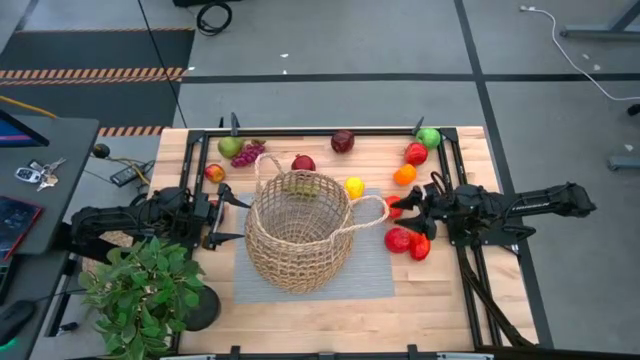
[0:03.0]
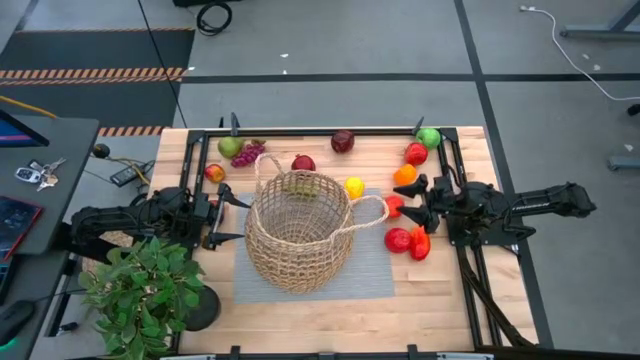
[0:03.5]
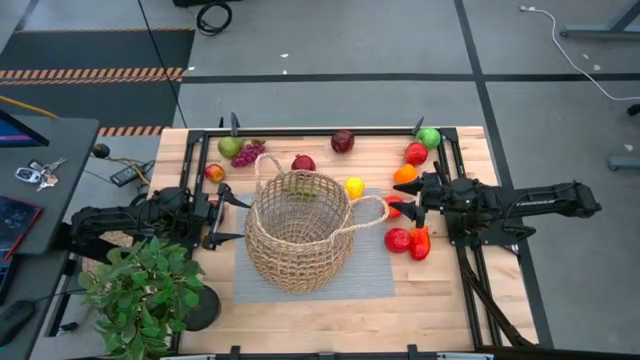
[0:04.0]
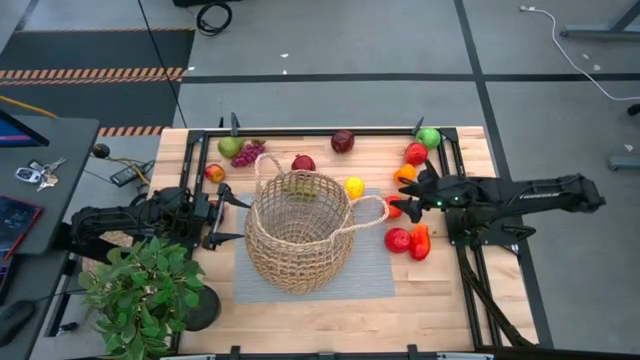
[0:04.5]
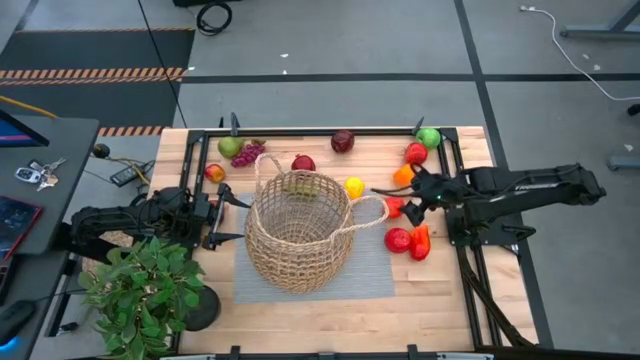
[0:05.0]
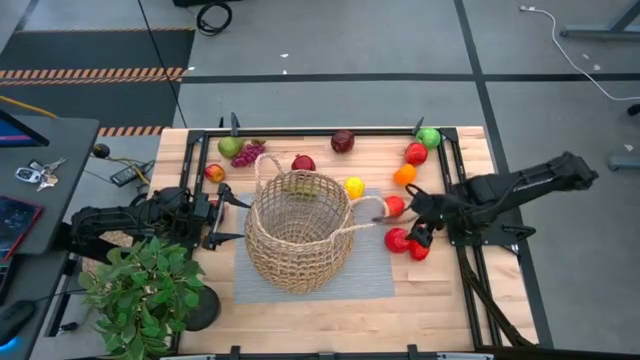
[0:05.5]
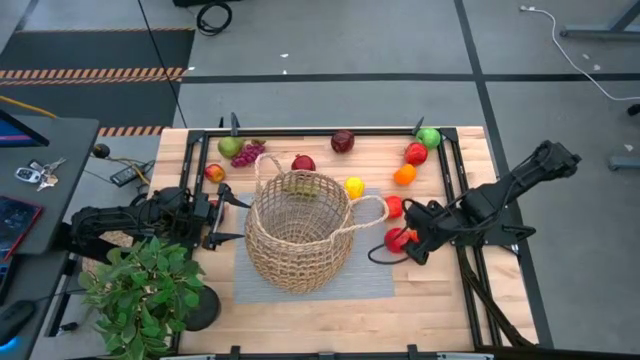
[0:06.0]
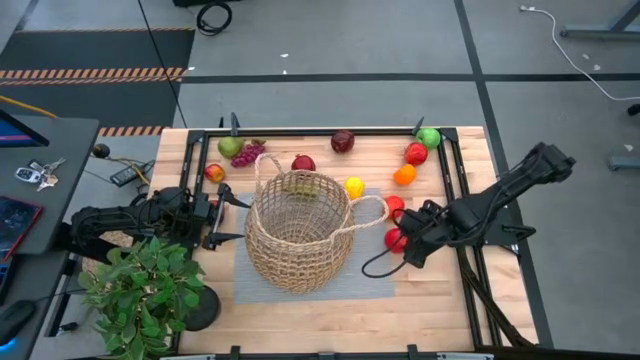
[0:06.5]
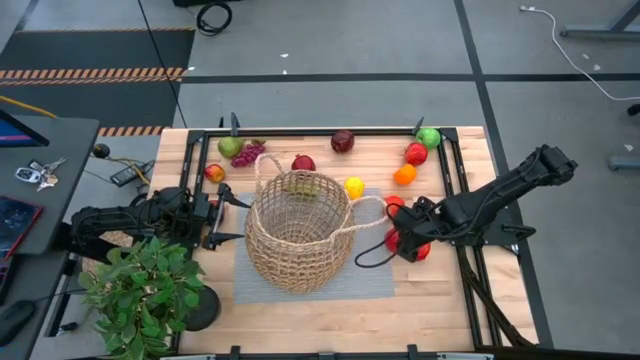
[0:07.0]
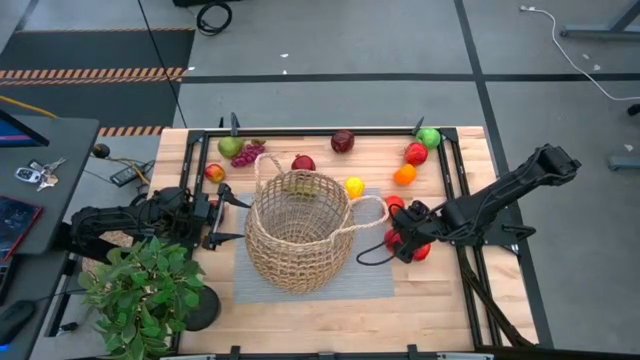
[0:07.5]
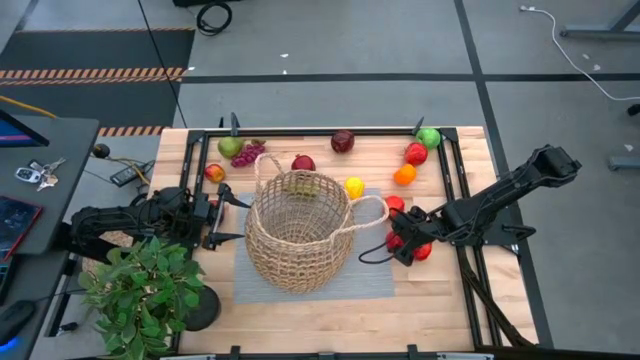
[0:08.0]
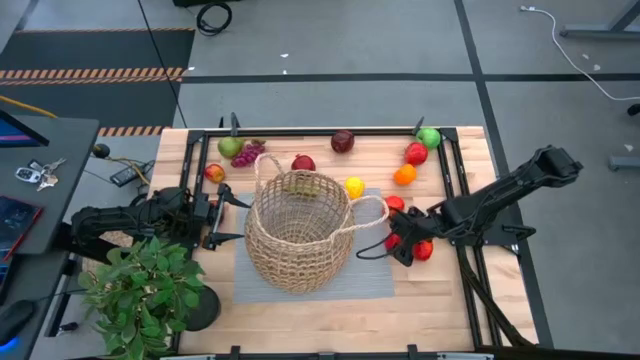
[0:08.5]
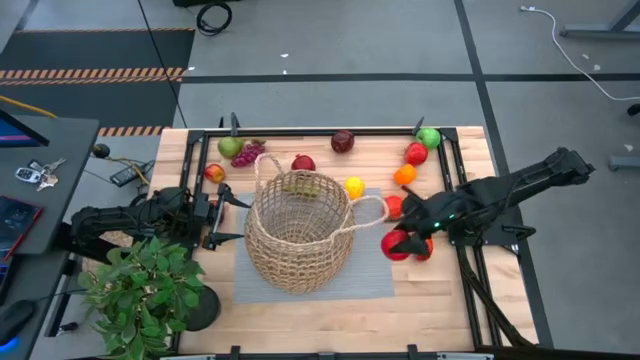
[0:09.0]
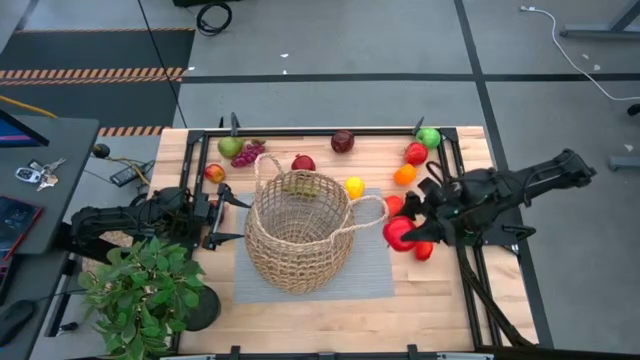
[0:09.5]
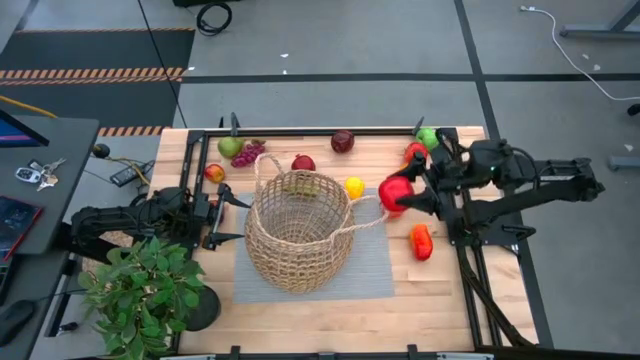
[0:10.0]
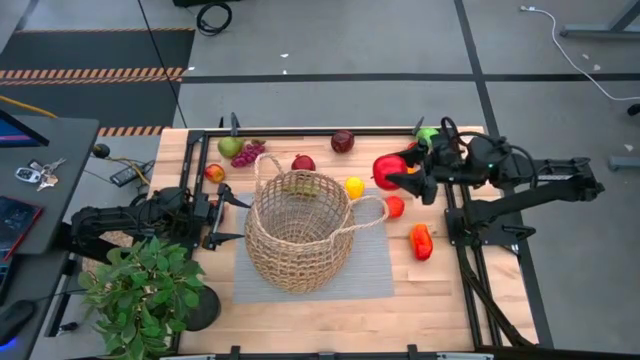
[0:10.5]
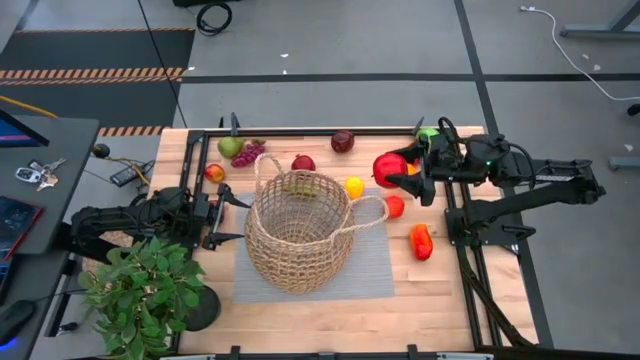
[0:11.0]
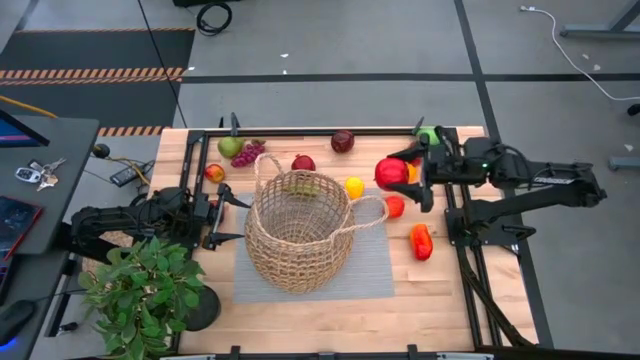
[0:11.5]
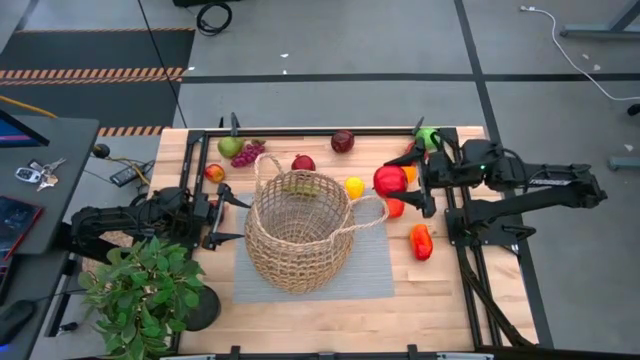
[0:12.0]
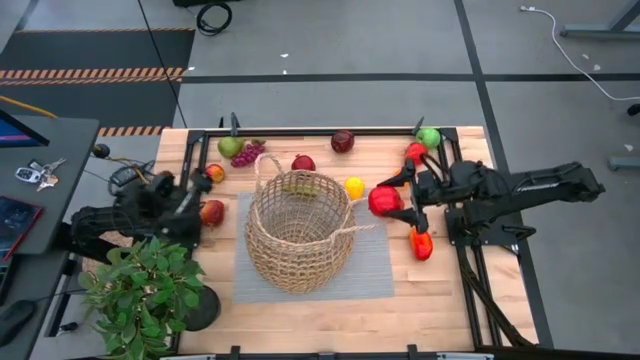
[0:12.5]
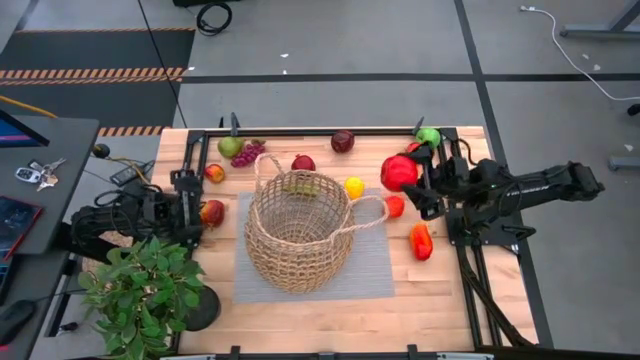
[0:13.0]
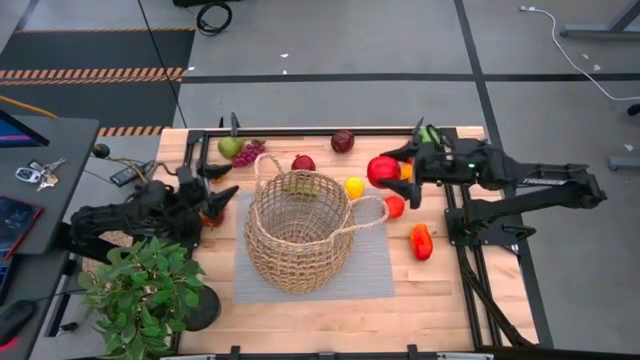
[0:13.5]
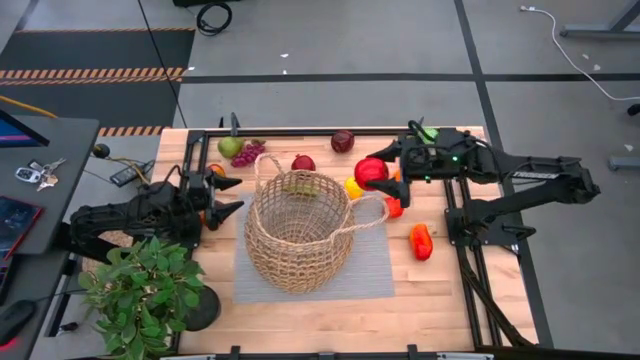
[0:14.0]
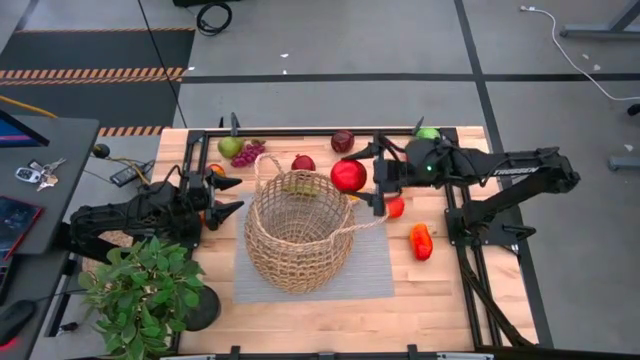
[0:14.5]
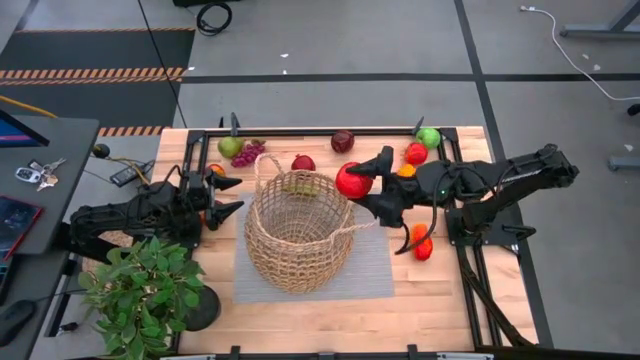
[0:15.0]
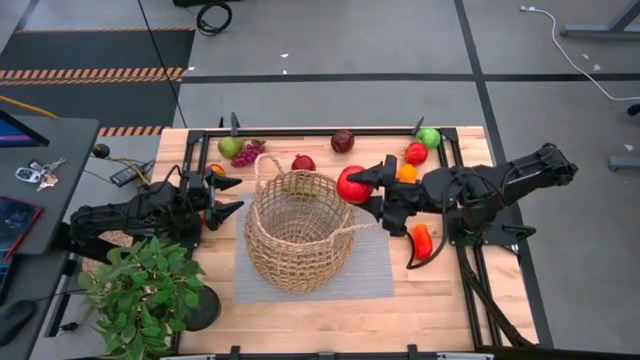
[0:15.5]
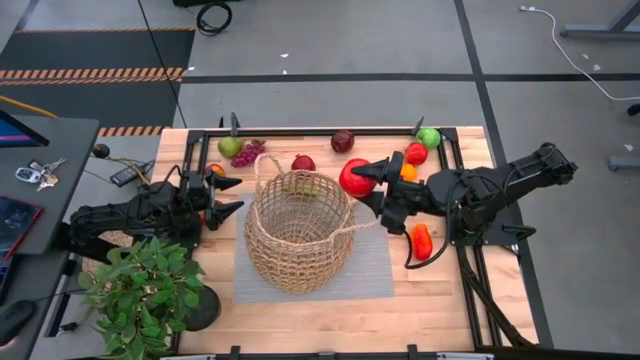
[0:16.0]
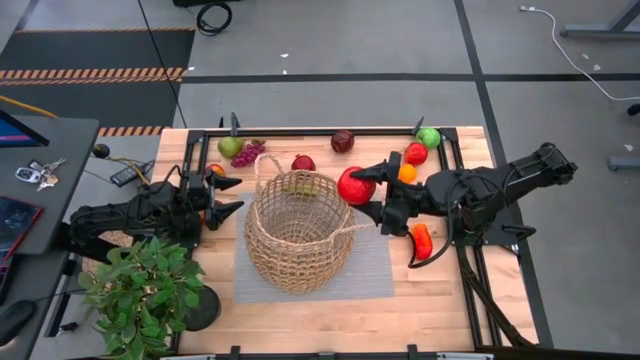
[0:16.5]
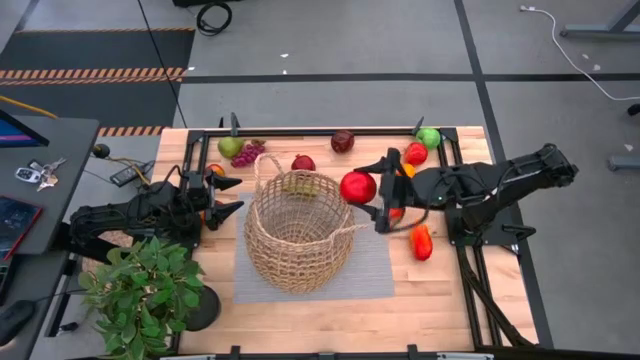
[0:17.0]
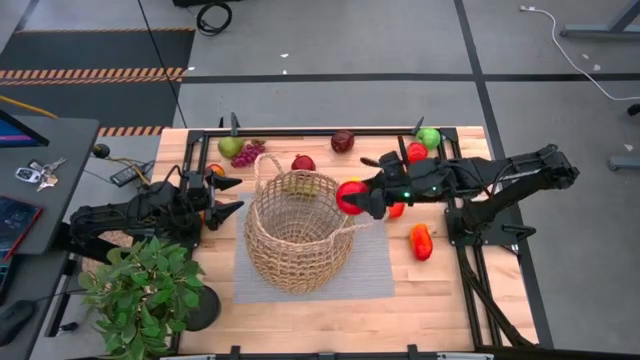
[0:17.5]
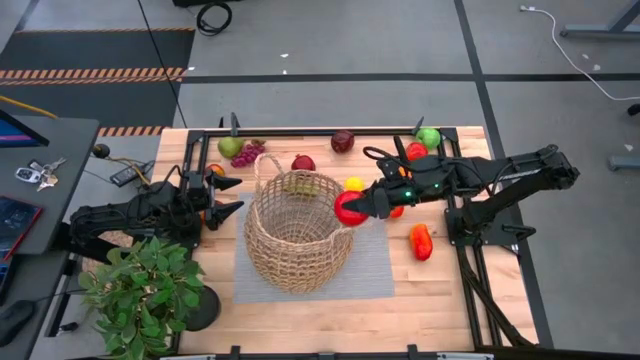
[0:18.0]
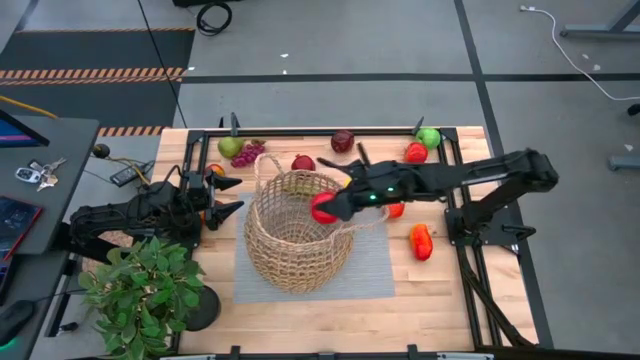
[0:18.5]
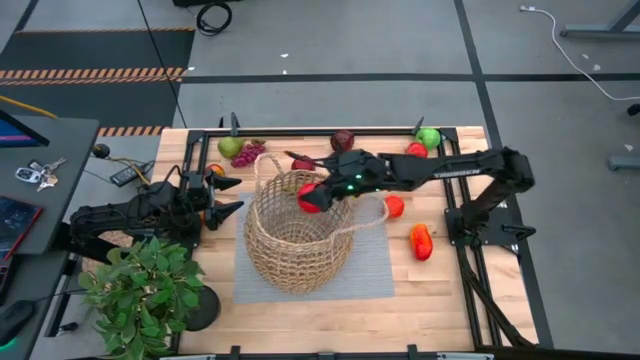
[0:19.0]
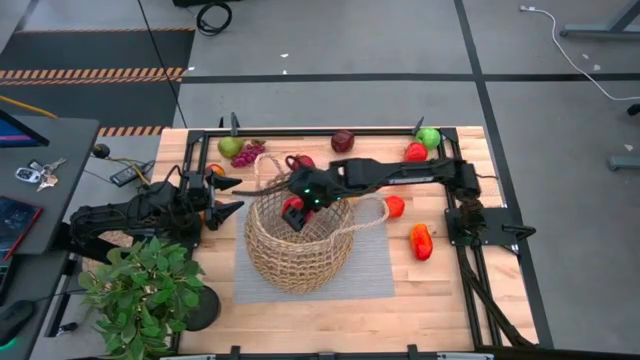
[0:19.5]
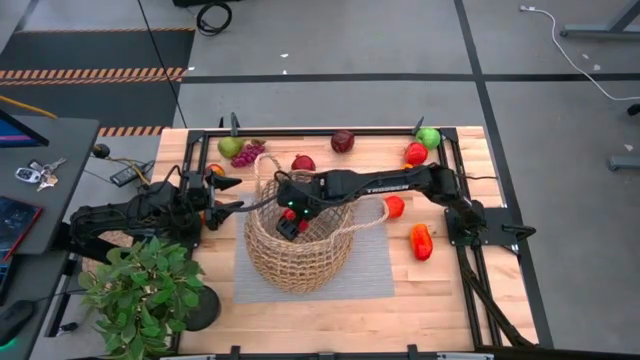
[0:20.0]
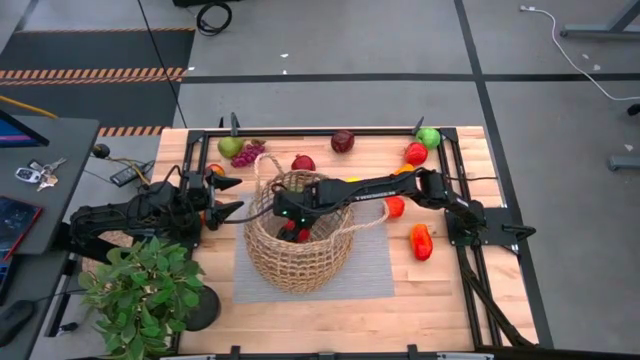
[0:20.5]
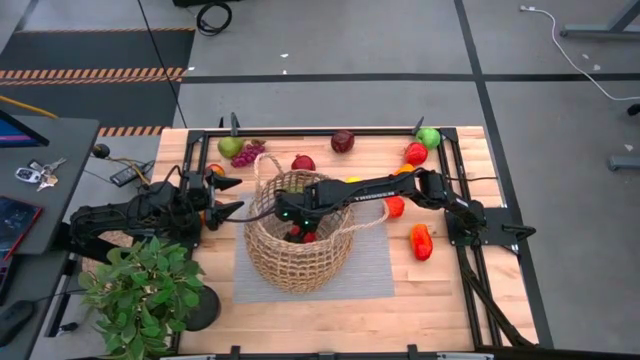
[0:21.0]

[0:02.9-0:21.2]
Task: Build produce basket
Put the red apple into the brown woven basket
